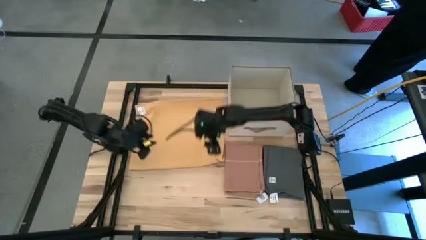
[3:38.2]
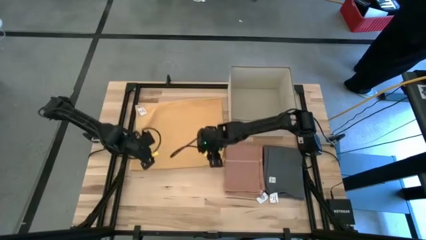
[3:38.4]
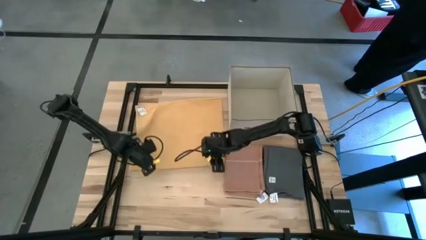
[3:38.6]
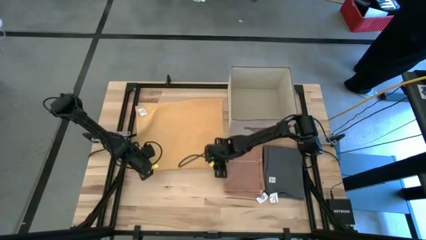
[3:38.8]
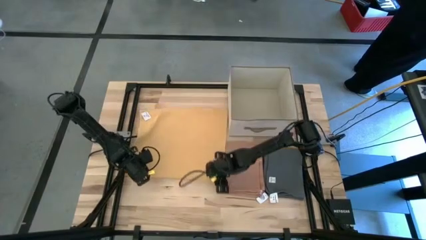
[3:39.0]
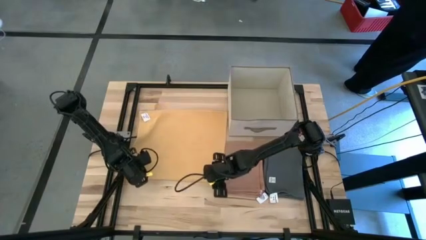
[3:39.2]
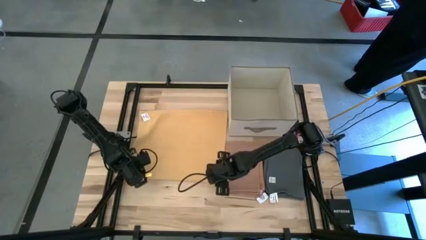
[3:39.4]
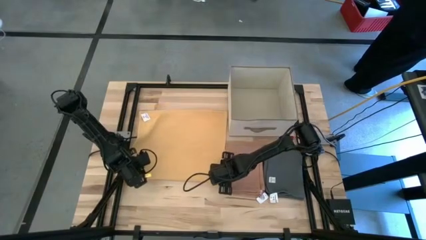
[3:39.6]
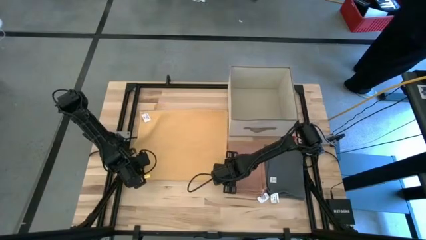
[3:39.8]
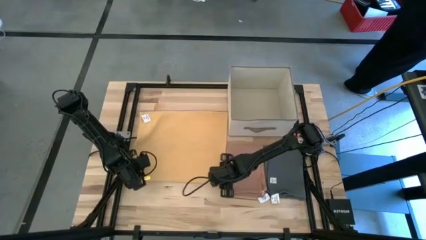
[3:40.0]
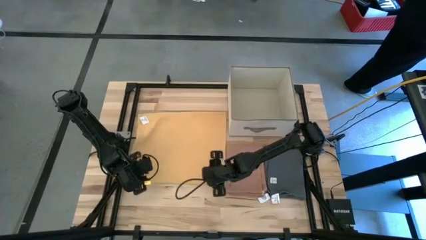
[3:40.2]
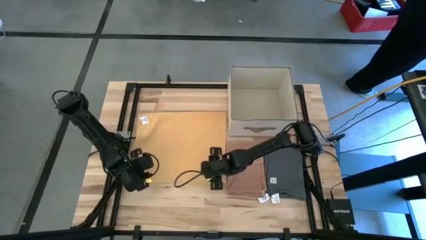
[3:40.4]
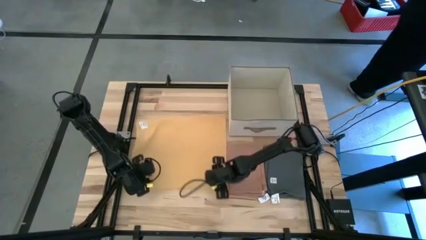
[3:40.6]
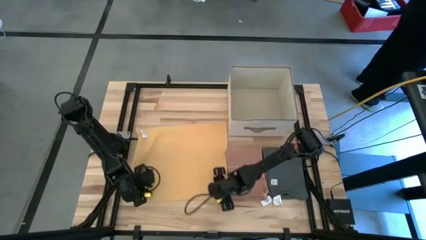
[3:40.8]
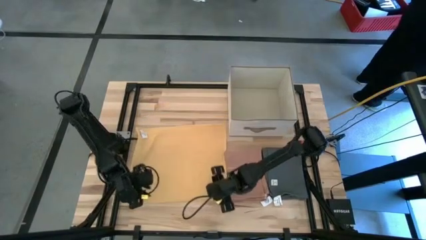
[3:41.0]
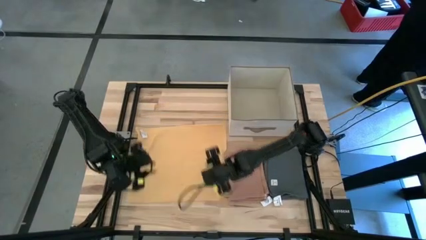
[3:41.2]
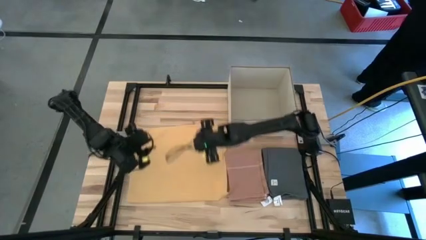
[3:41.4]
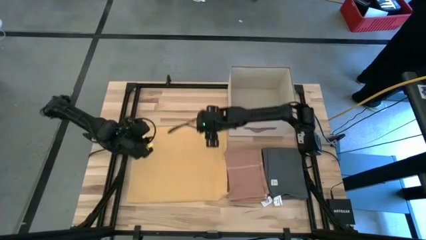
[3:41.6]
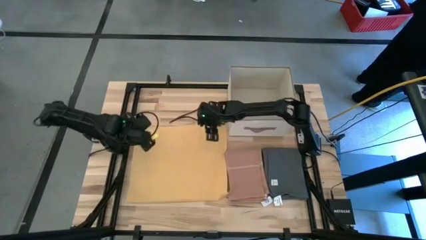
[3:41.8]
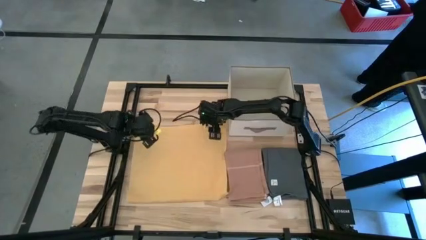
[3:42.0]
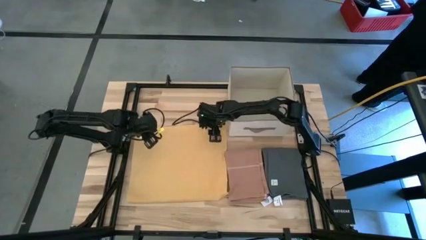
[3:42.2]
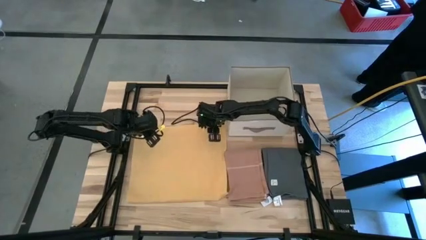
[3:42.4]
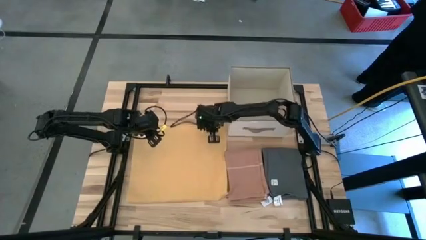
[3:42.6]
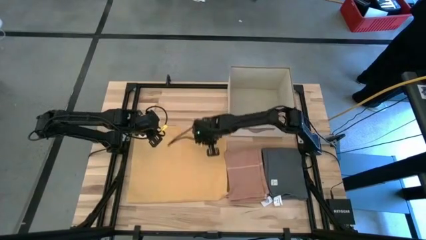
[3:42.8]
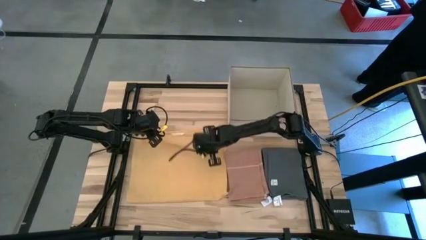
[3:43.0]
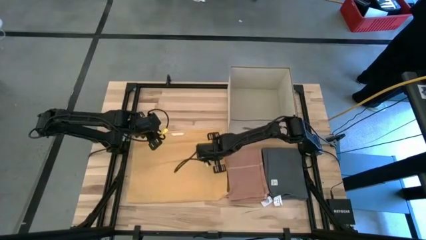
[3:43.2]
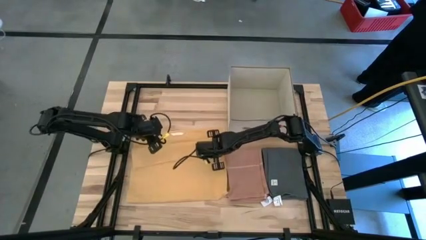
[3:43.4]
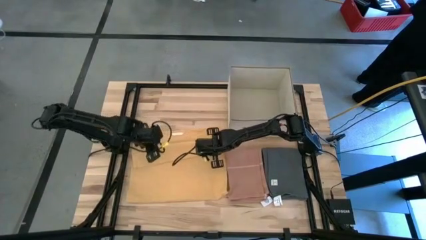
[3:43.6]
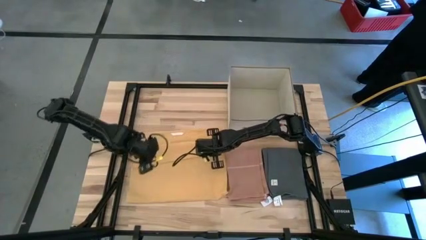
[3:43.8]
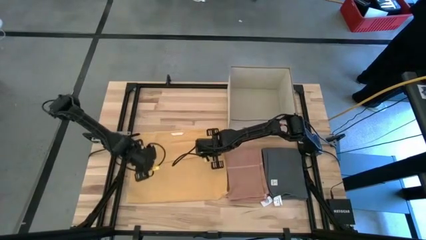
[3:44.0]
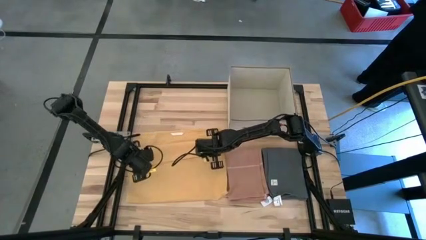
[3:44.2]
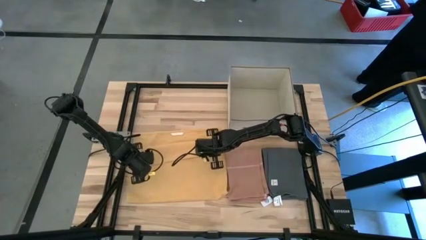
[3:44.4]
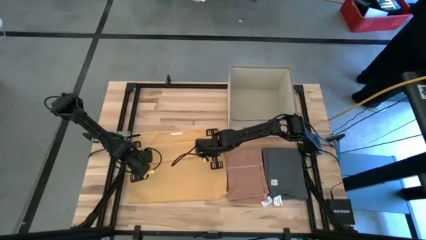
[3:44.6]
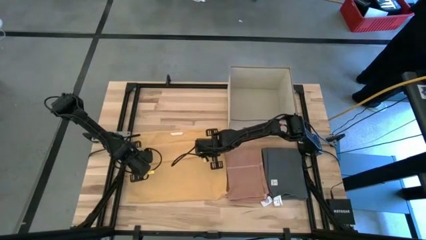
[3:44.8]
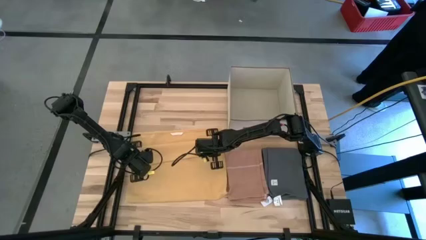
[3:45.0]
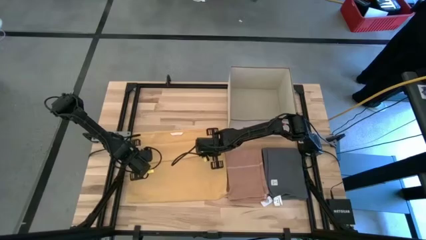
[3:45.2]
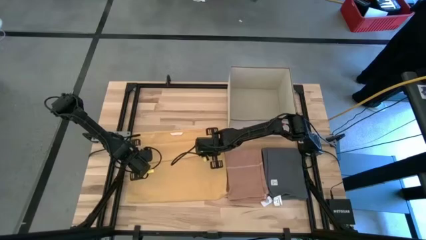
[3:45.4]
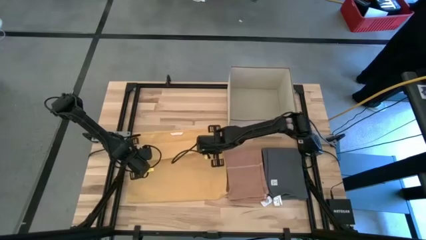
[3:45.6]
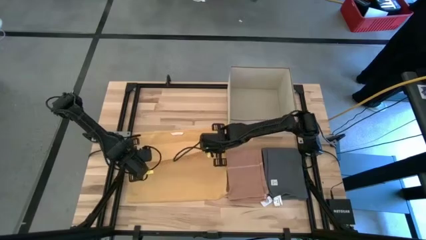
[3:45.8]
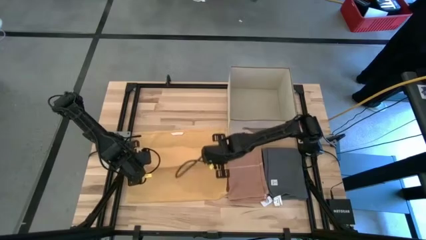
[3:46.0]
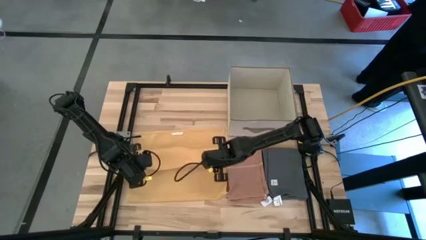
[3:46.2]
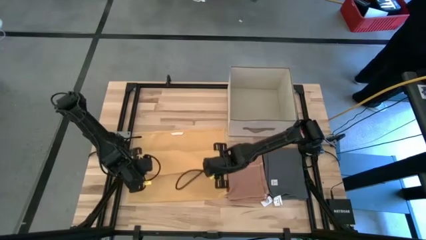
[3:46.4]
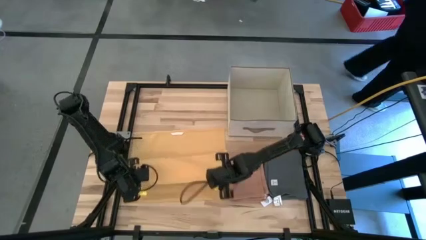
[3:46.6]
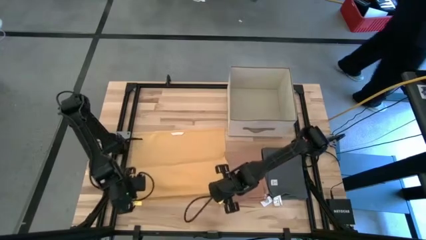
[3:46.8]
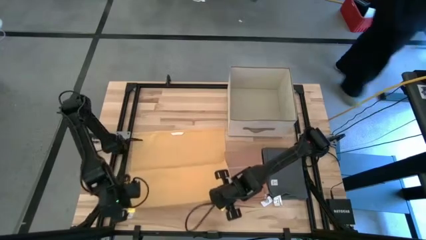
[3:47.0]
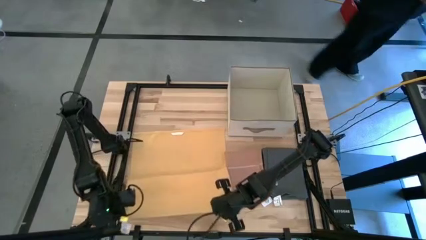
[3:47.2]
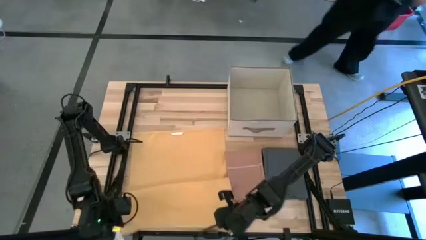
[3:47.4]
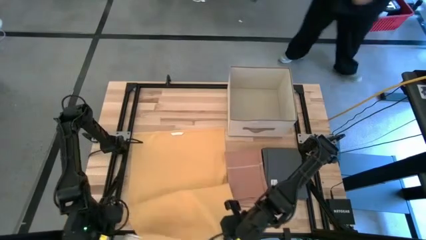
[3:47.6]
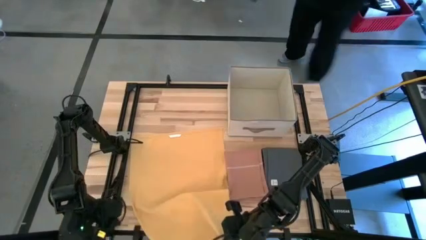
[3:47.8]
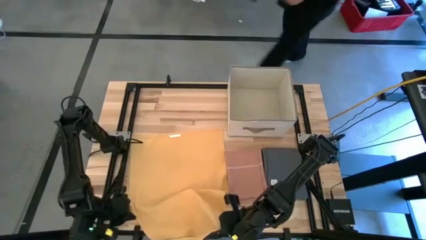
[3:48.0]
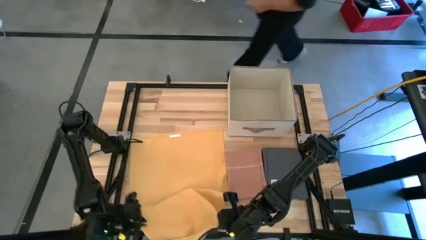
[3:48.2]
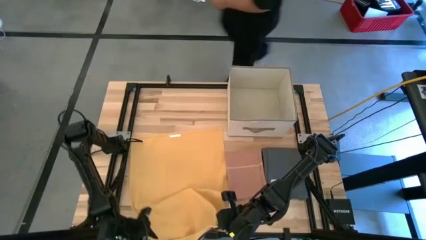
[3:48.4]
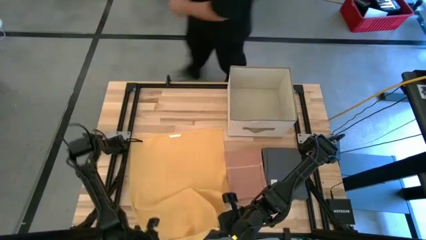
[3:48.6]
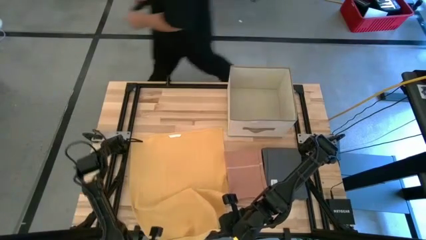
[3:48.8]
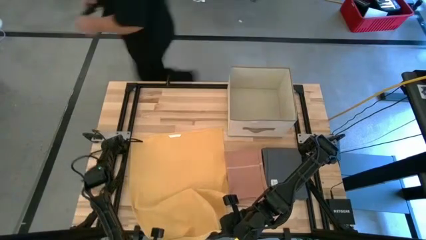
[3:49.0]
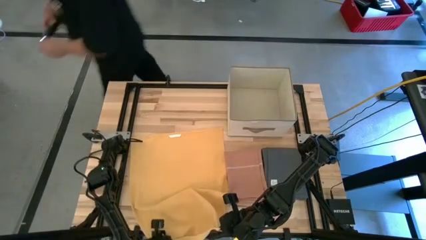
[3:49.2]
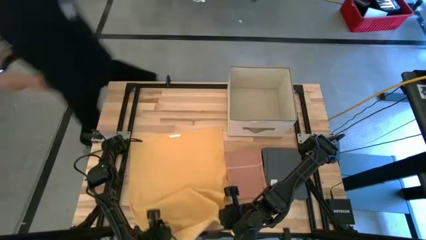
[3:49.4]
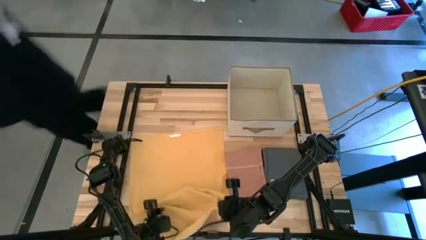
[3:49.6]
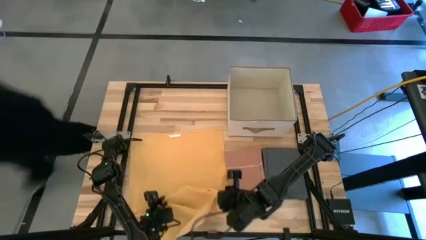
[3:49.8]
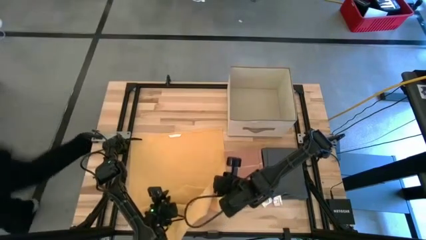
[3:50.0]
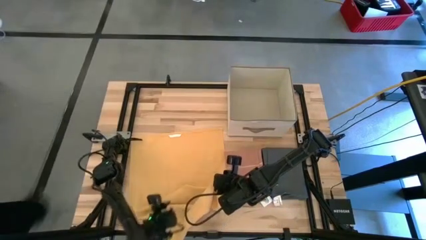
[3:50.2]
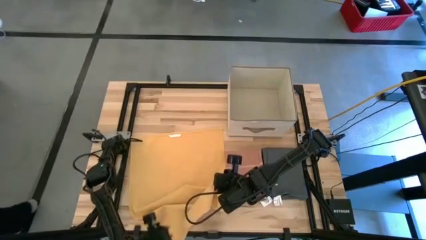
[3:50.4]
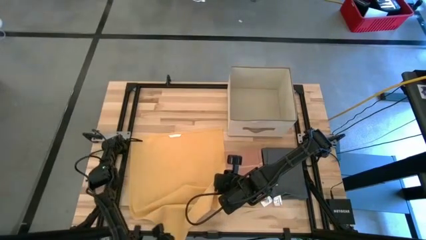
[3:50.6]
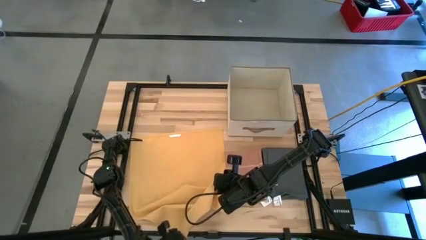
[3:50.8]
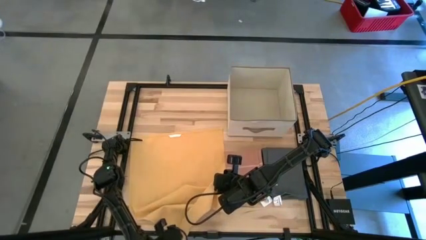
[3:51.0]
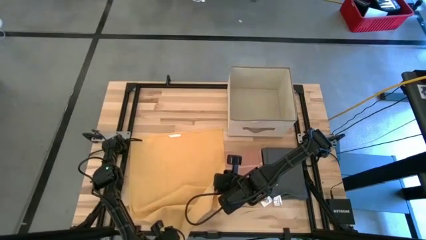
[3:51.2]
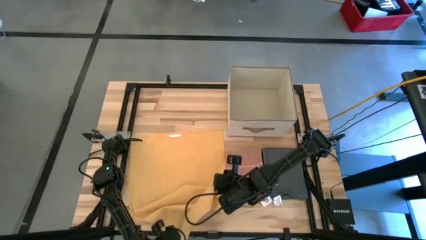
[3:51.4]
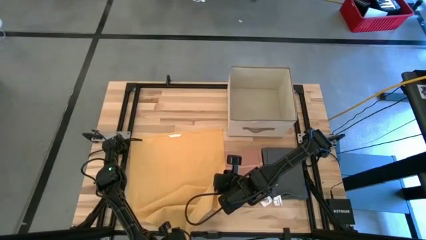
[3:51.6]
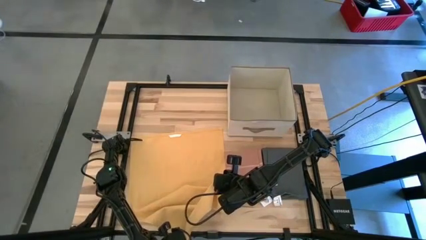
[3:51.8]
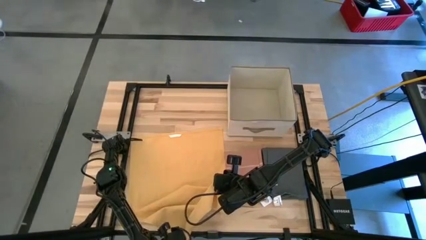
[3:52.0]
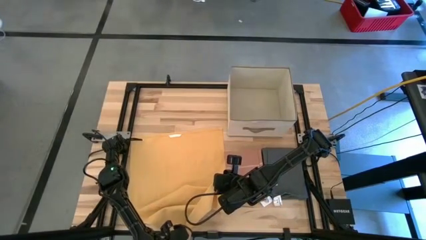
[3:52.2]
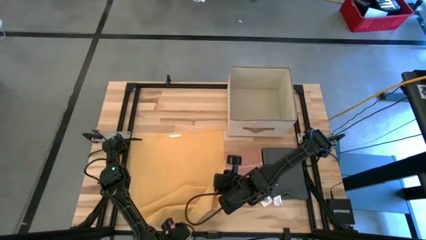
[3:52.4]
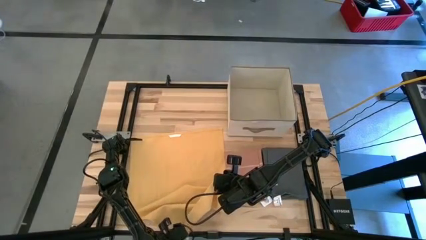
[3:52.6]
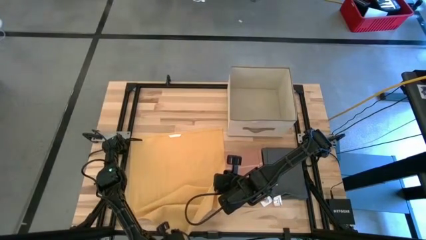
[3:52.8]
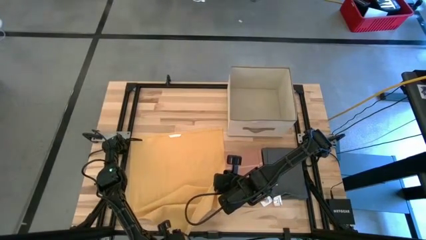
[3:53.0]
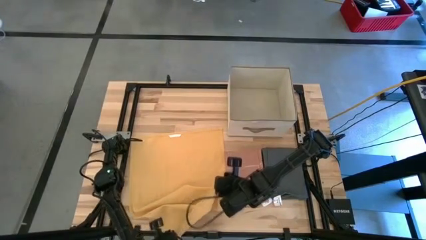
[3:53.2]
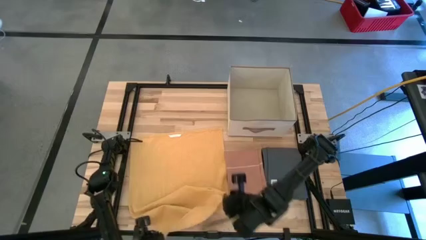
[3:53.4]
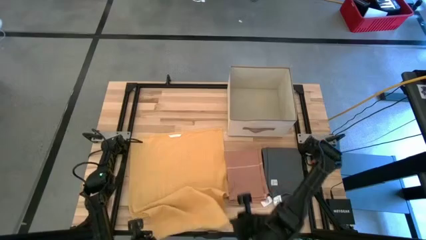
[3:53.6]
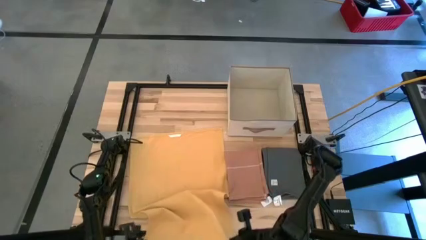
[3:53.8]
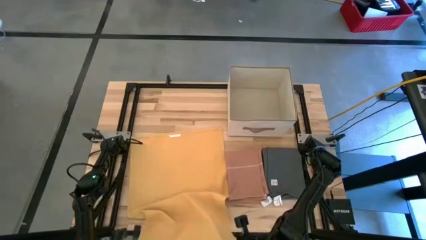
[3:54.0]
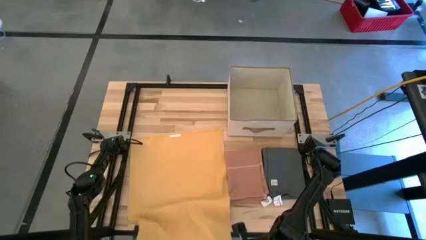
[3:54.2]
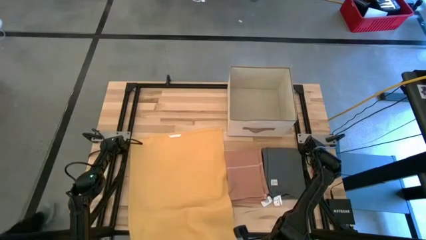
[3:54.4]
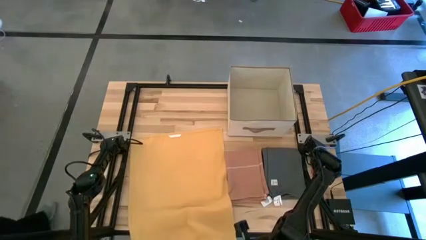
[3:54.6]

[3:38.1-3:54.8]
Task: Fold towel
Fold the yellow towel
